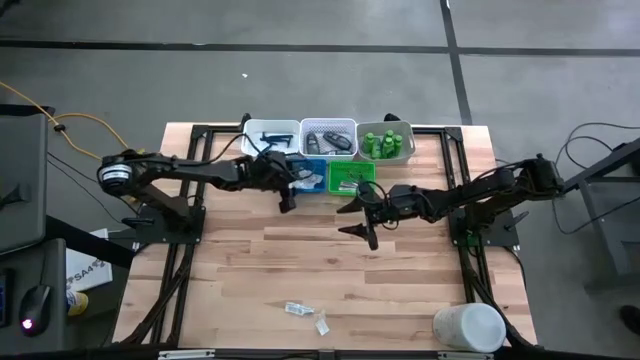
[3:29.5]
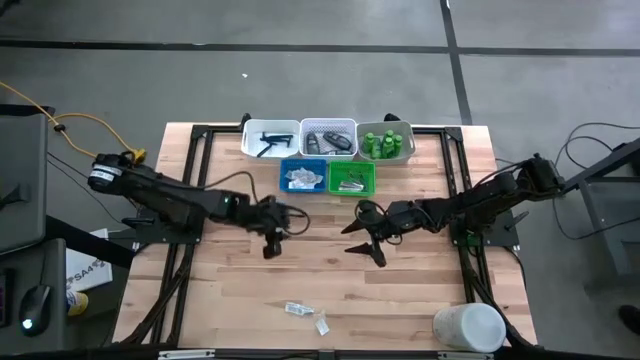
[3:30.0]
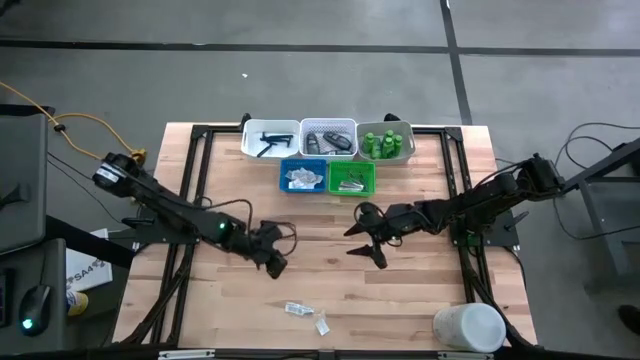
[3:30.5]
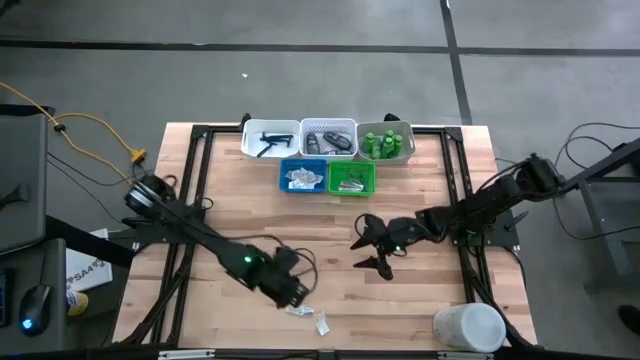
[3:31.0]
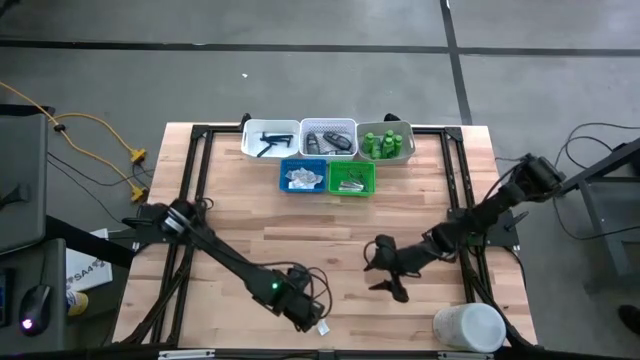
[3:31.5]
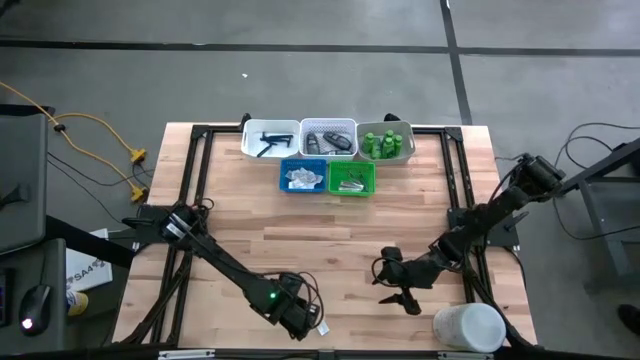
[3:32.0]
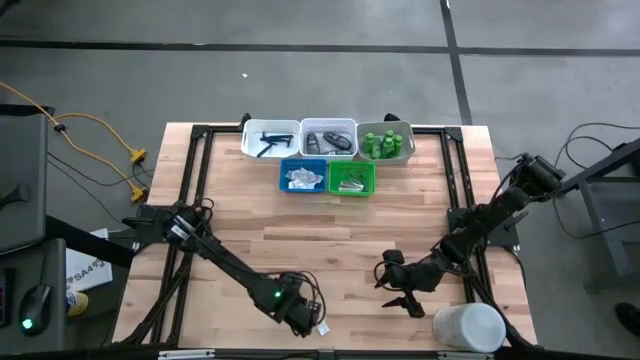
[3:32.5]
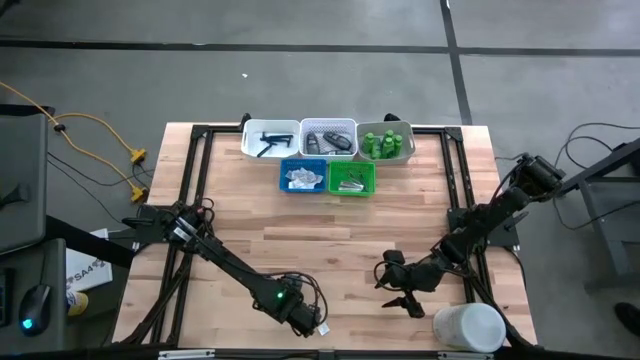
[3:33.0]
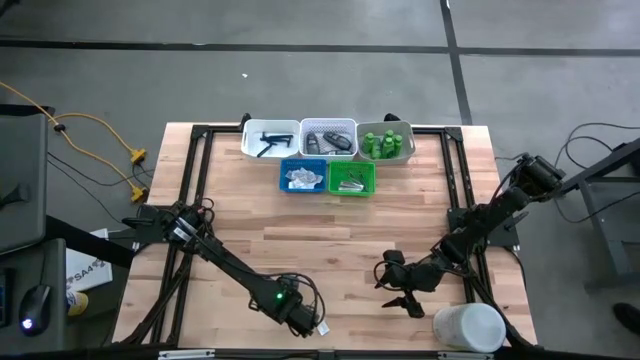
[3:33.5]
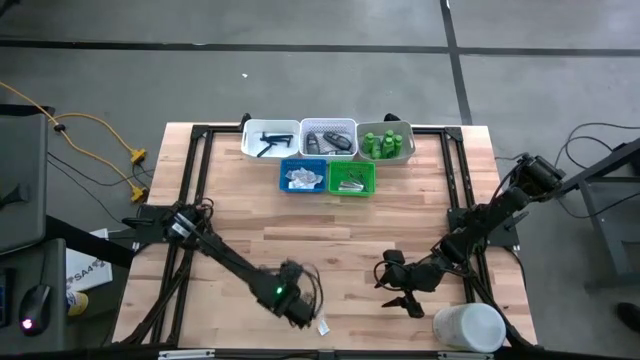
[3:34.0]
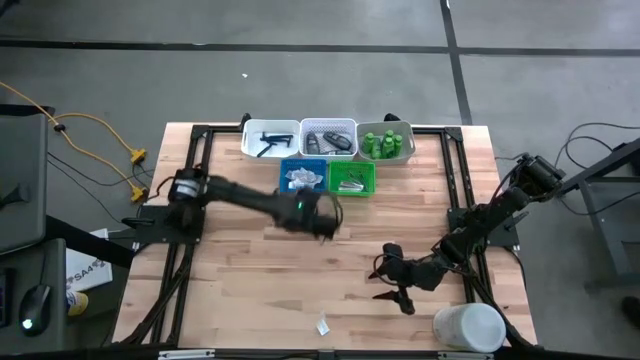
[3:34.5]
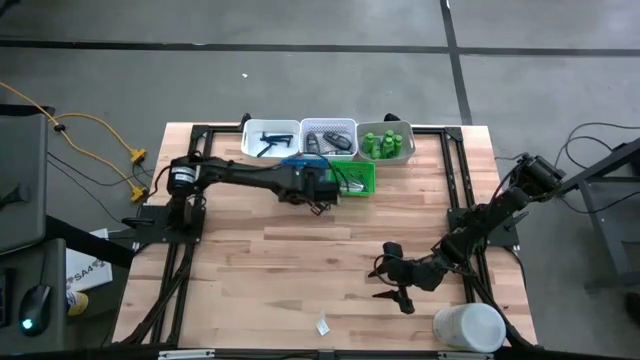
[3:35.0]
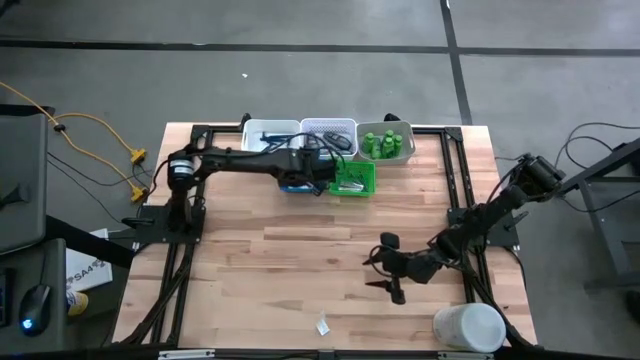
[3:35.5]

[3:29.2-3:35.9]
Task: Pick & Place Travel size toiletries
Put the white bandage pad into the blue basket

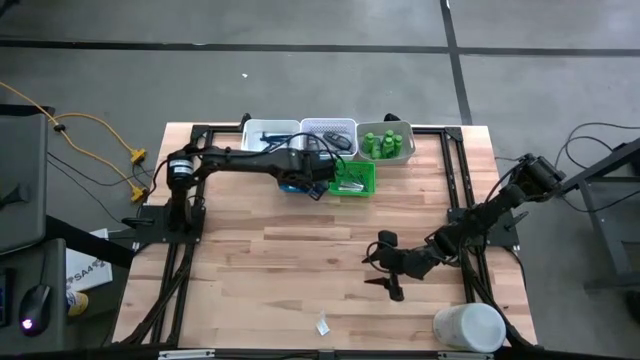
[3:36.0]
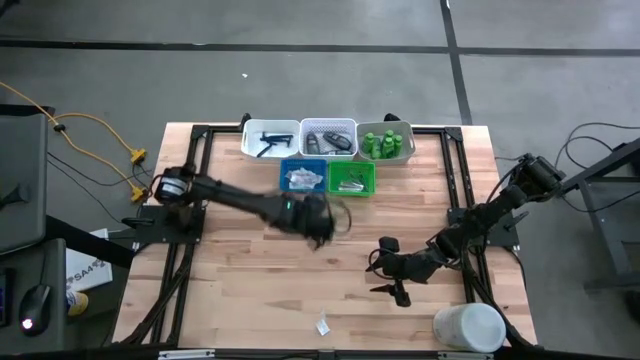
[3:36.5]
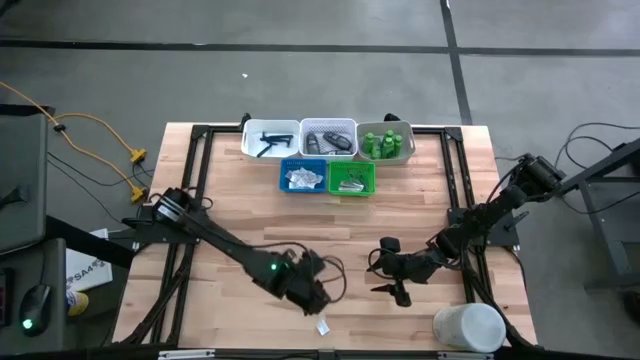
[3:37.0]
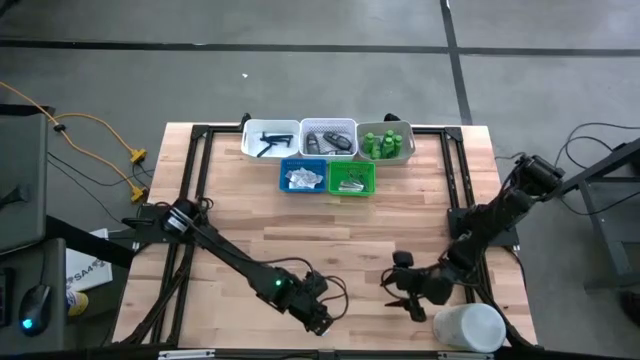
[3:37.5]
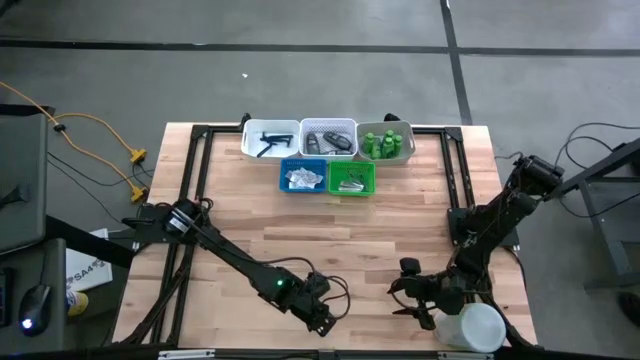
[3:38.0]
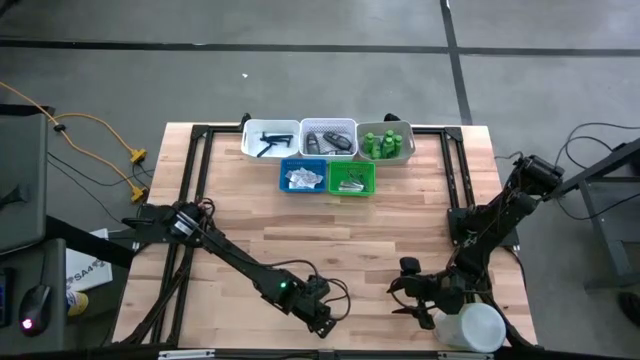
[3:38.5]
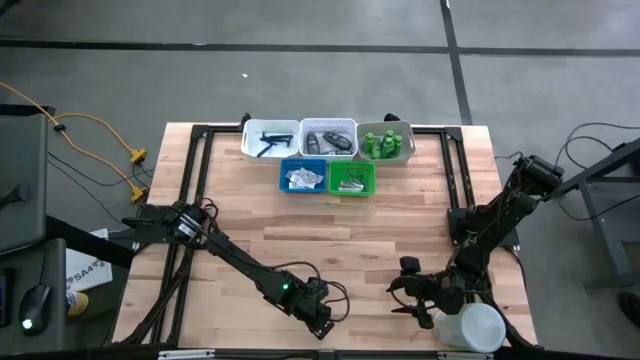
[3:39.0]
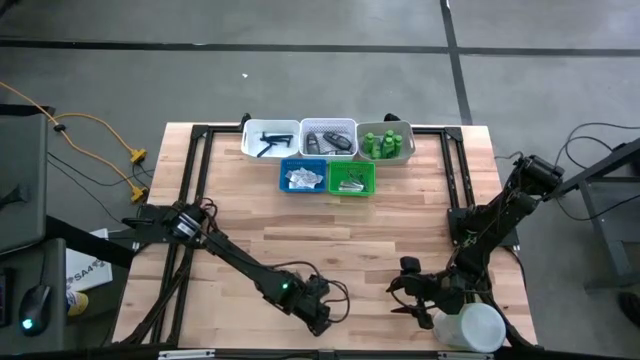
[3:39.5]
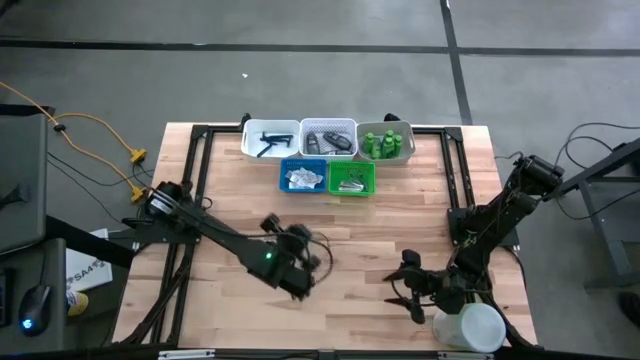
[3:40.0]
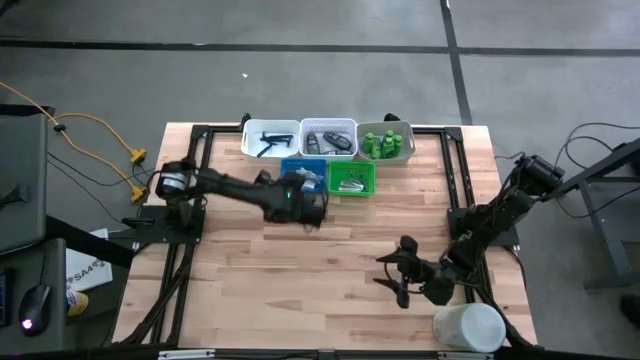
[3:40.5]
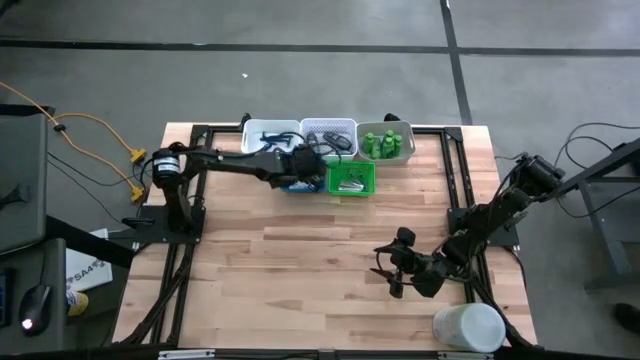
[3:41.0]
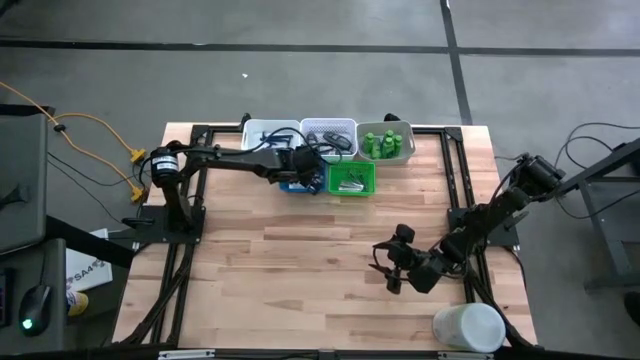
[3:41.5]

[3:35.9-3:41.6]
Put the white bandage pad into the blue basket

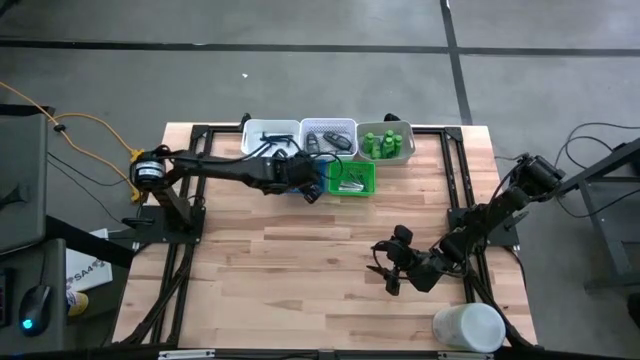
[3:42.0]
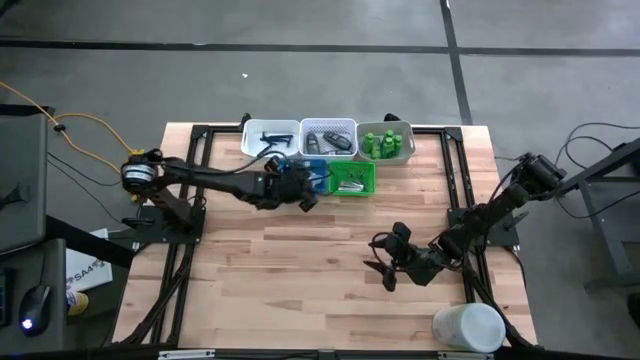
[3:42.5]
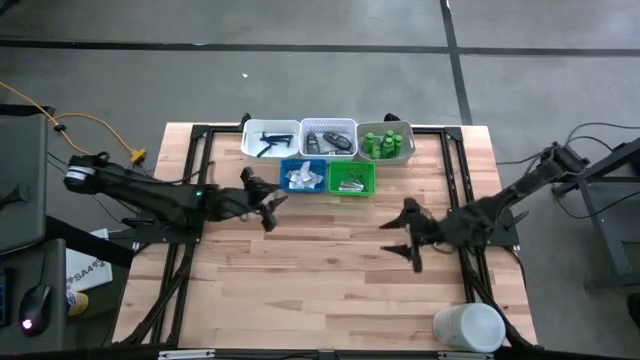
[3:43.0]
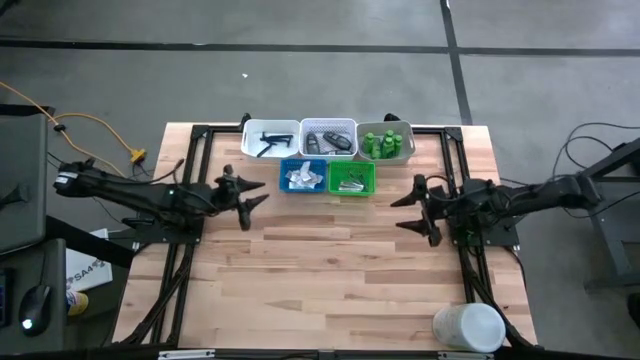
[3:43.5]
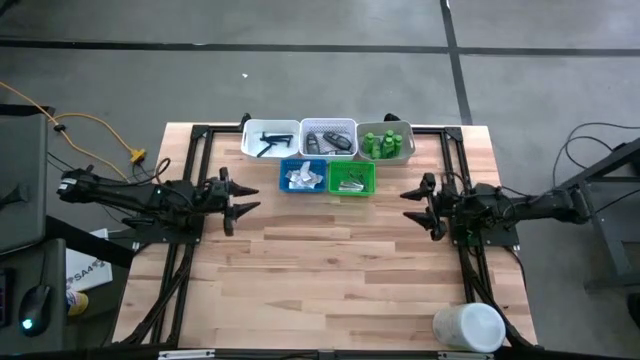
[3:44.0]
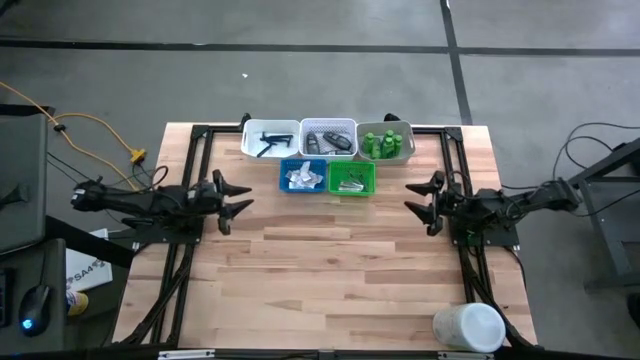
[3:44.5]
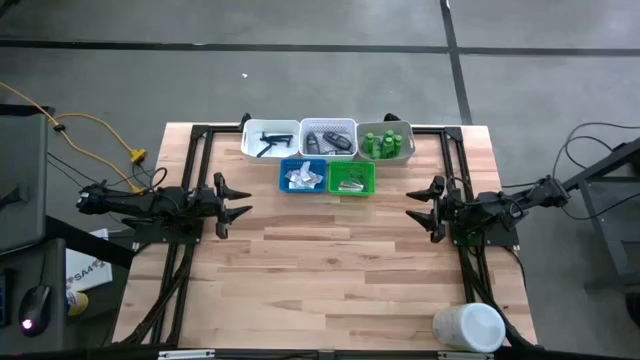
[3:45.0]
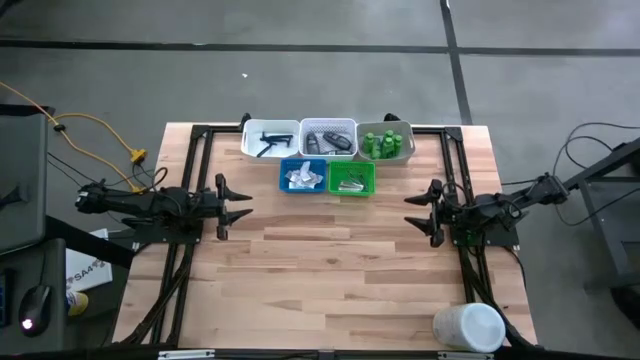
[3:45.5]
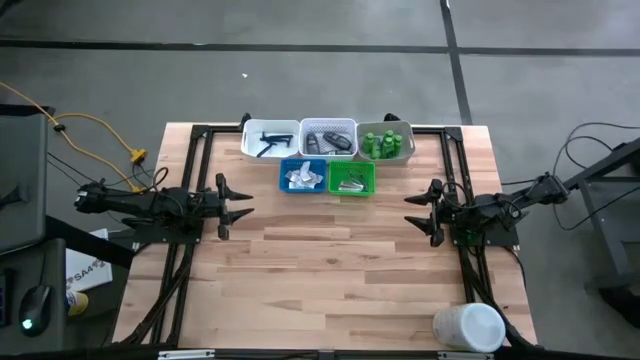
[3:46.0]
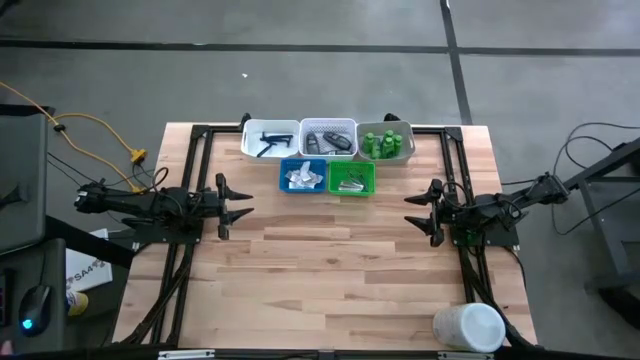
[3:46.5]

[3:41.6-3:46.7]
Return to Home Position

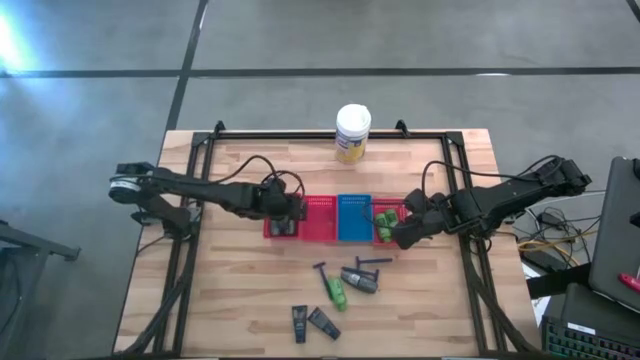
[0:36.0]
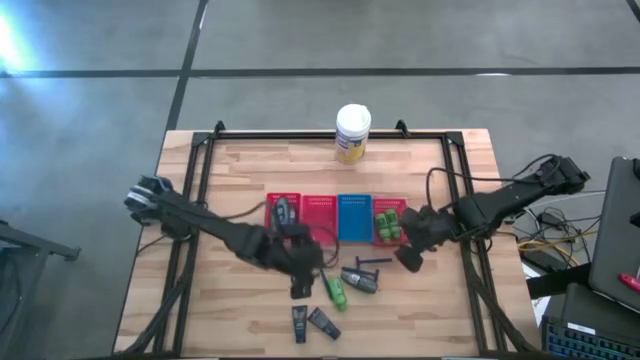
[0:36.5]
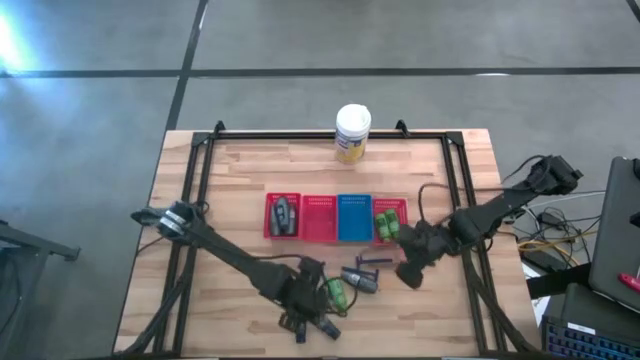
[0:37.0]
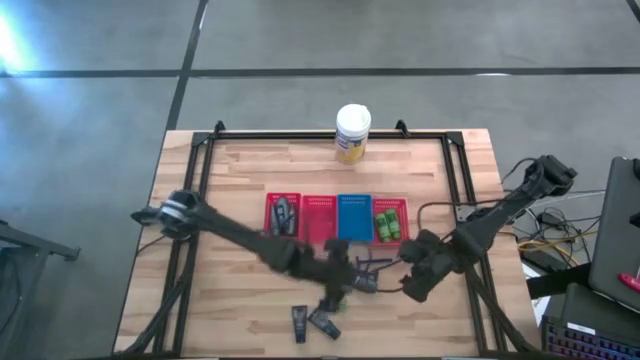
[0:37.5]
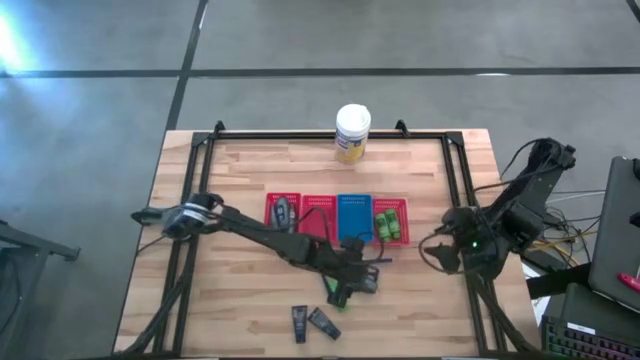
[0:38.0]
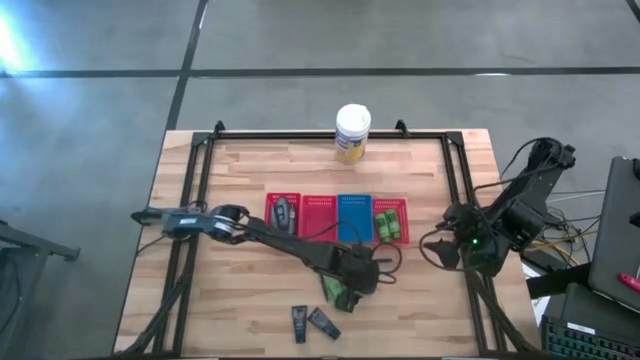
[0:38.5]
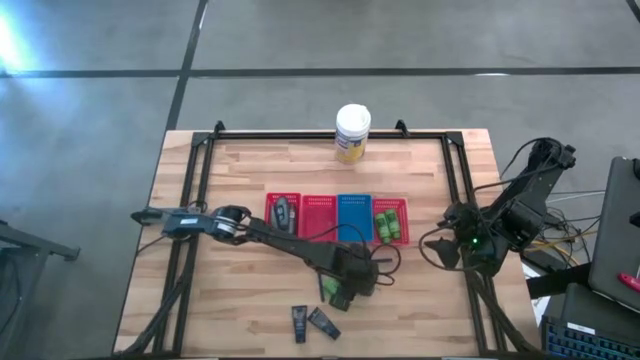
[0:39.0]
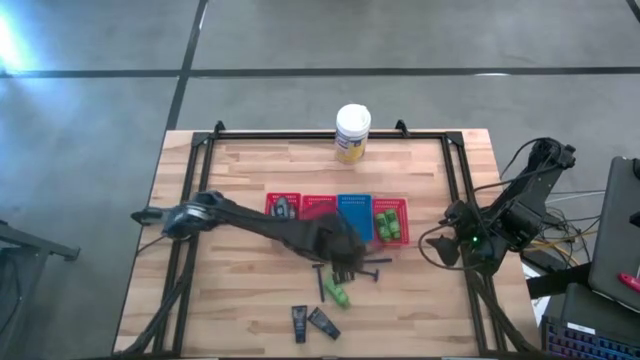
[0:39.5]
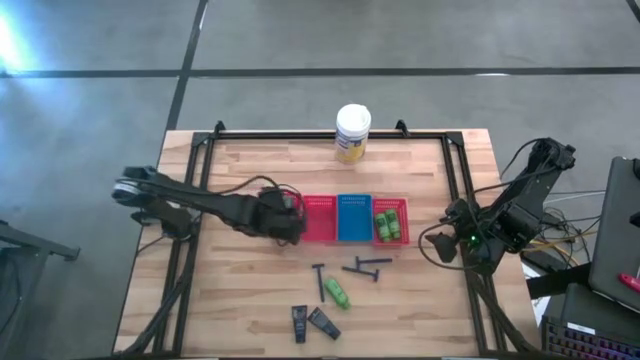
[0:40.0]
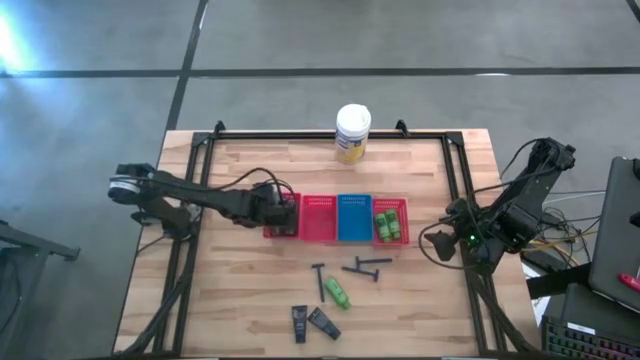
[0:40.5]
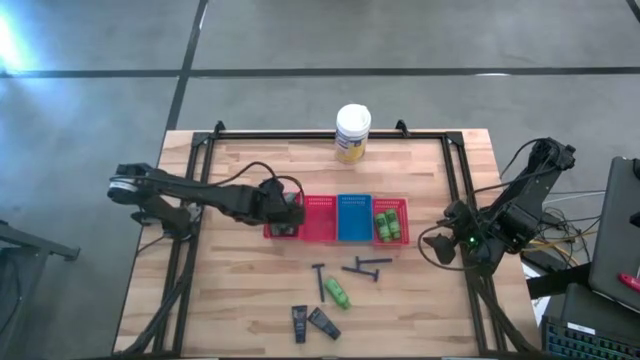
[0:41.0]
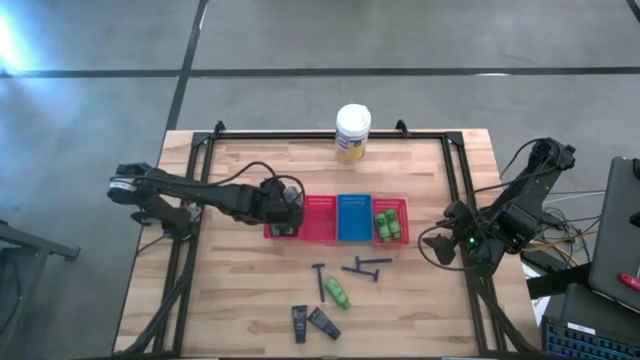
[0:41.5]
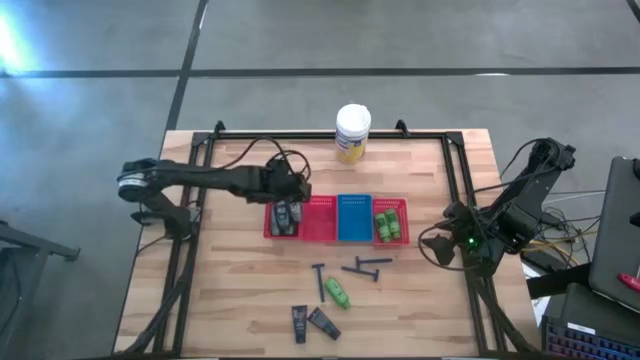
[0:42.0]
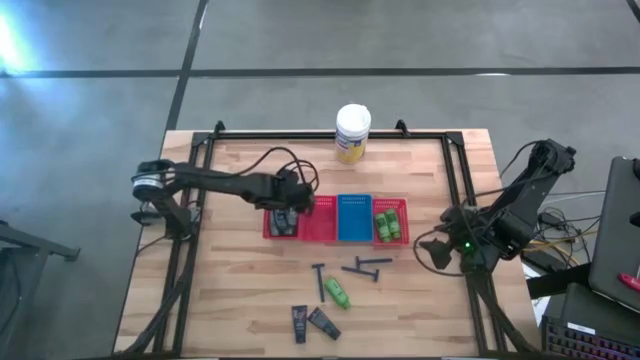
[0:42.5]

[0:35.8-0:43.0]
Task: Pick & Place Travel size toiletries
Put the gray deodorant into the left red bin
